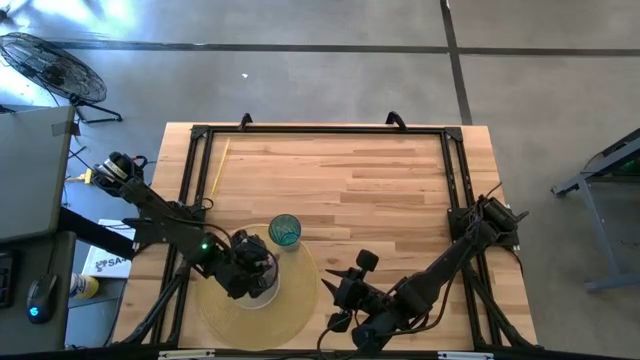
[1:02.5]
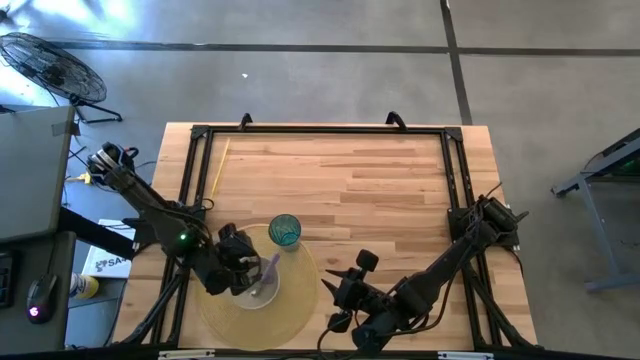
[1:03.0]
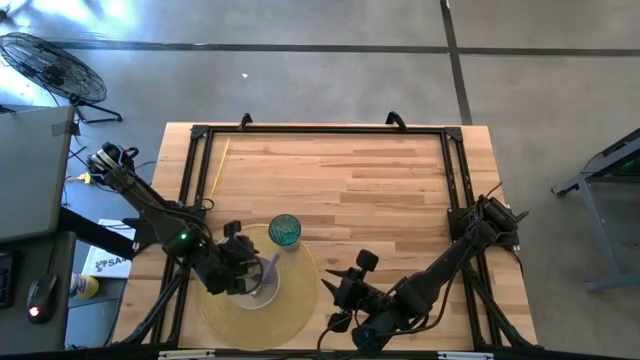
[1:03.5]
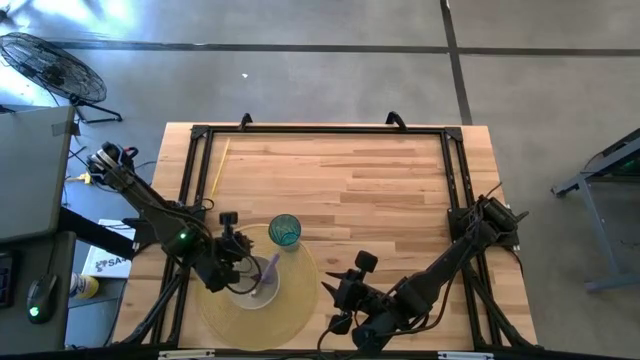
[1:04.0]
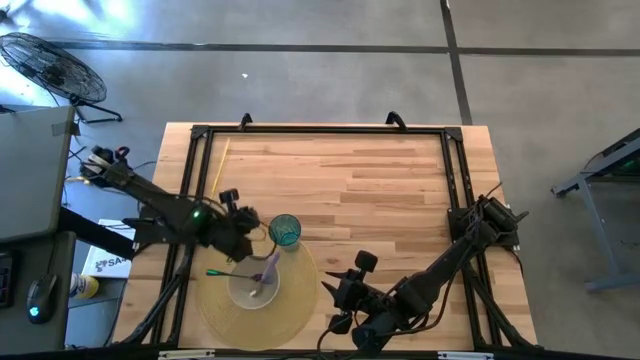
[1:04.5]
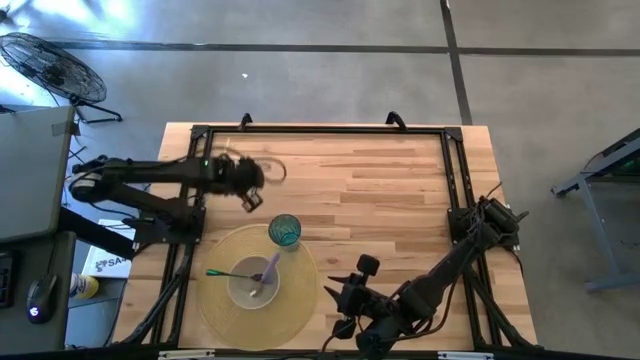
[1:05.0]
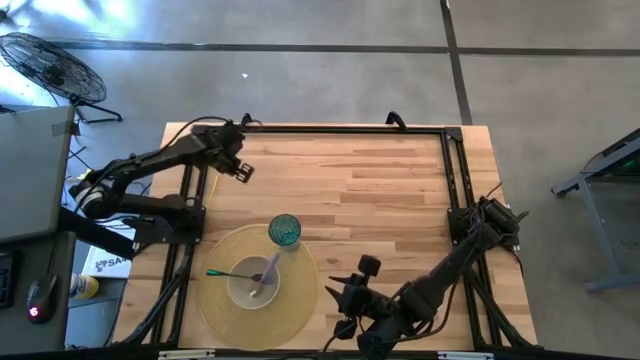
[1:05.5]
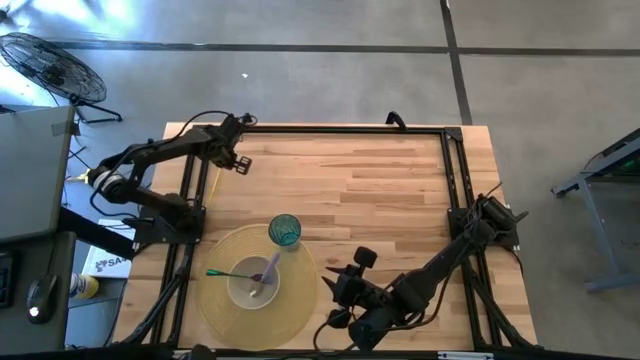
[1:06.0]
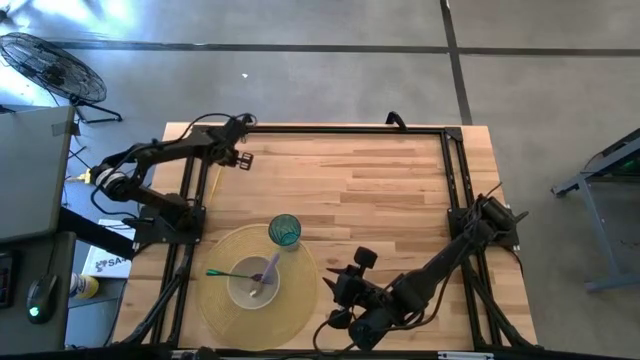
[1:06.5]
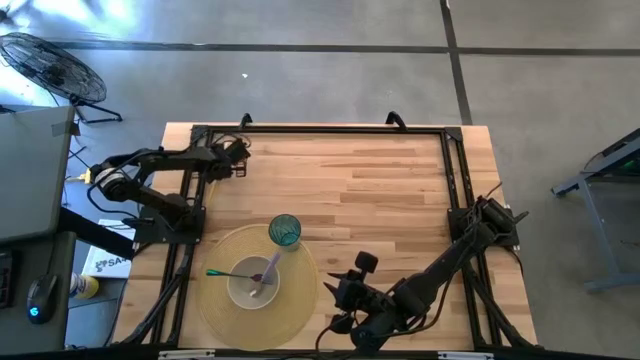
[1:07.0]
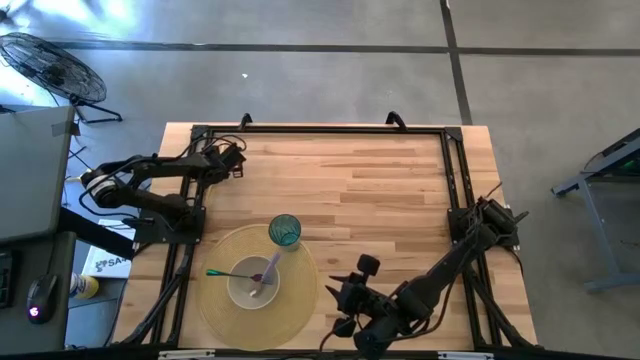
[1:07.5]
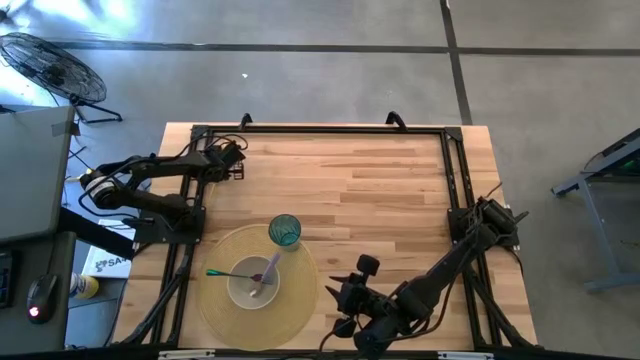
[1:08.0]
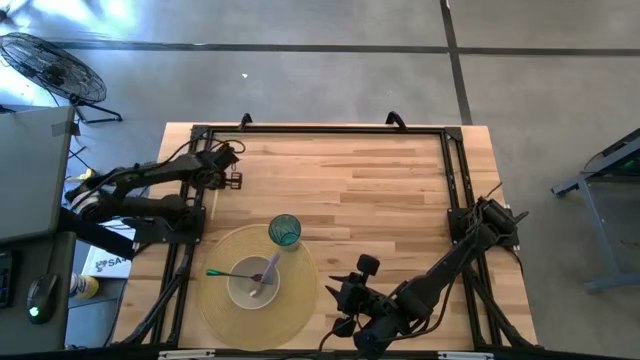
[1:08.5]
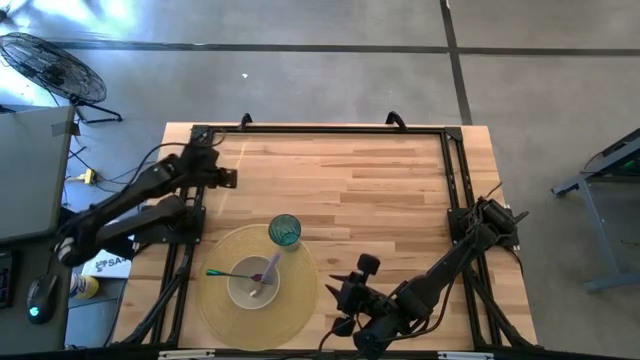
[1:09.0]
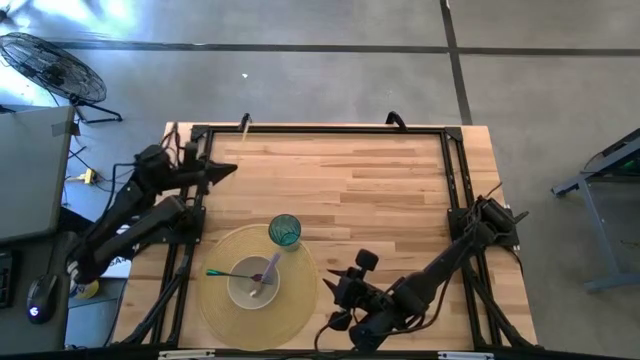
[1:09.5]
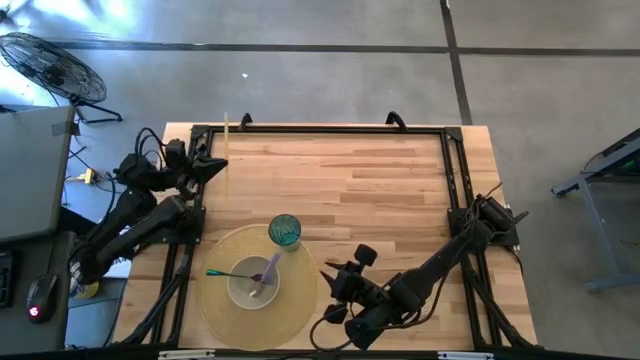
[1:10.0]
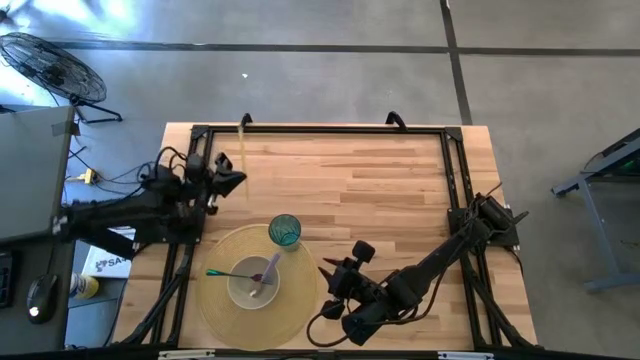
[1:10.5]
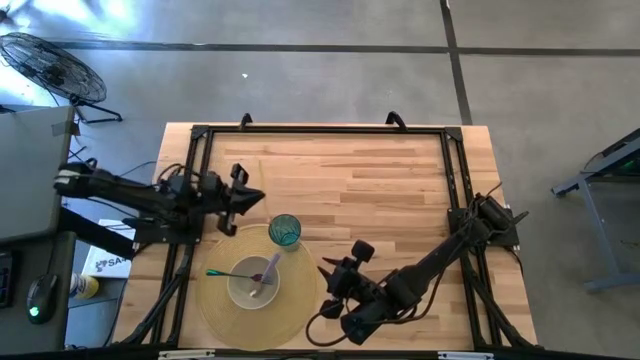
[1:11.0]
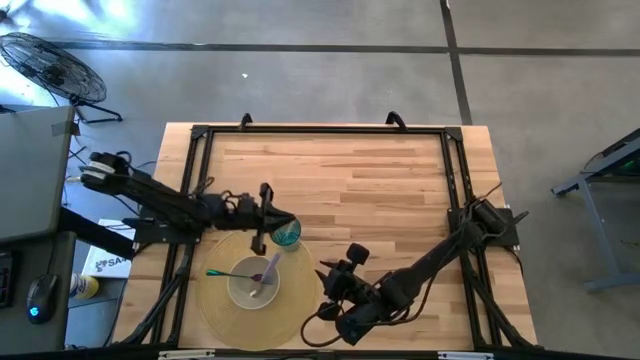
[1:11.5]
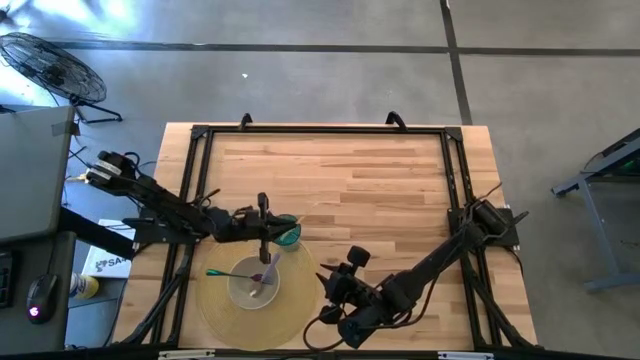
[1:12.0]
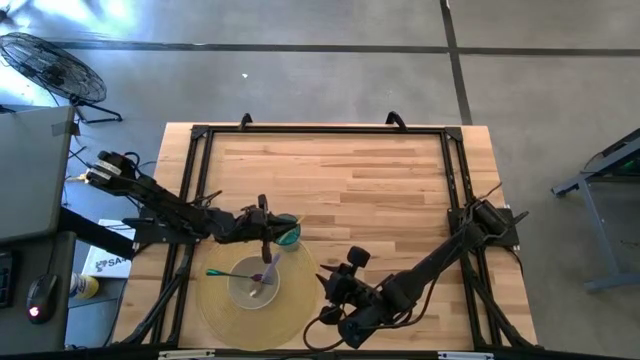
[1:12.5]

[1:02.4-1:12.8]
Task: Pick & Place Utensil
Put the yellow straw into the blue cup

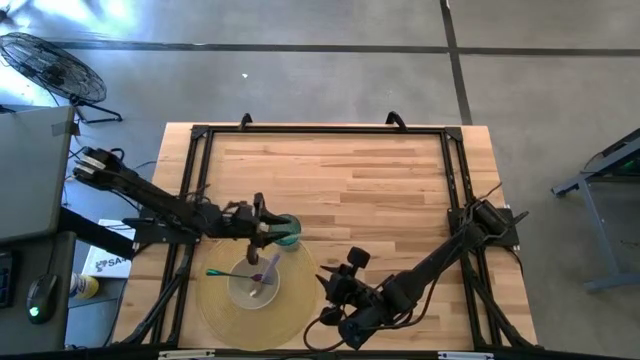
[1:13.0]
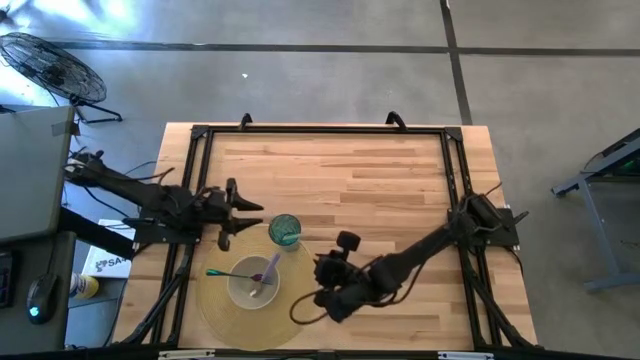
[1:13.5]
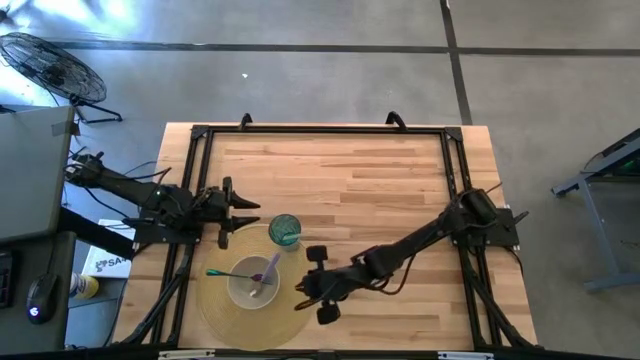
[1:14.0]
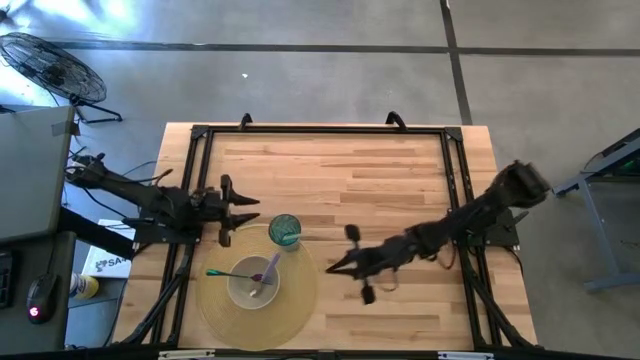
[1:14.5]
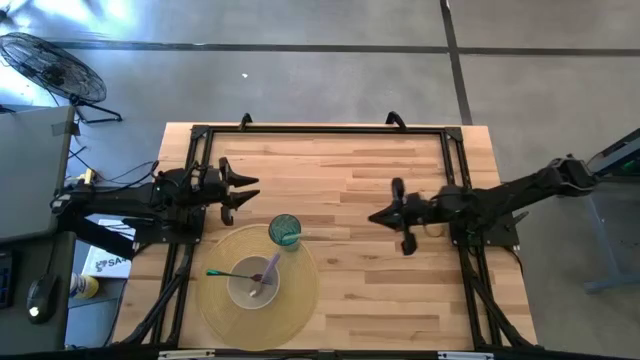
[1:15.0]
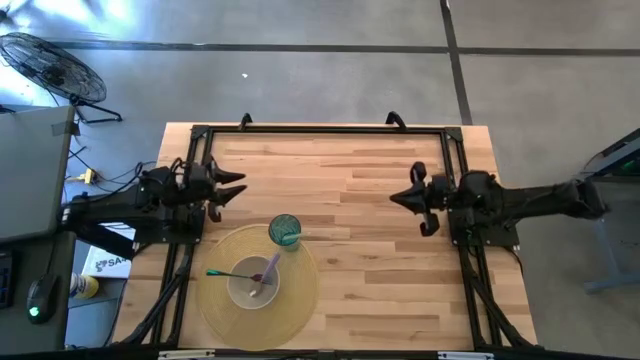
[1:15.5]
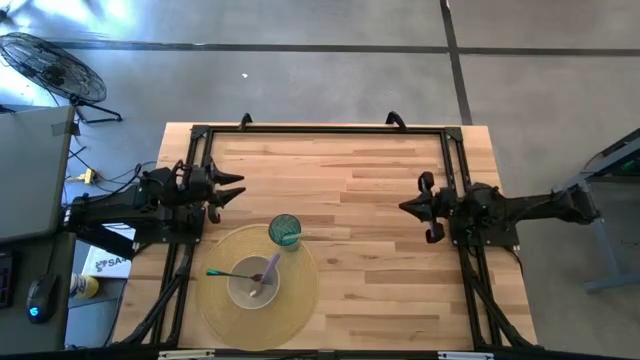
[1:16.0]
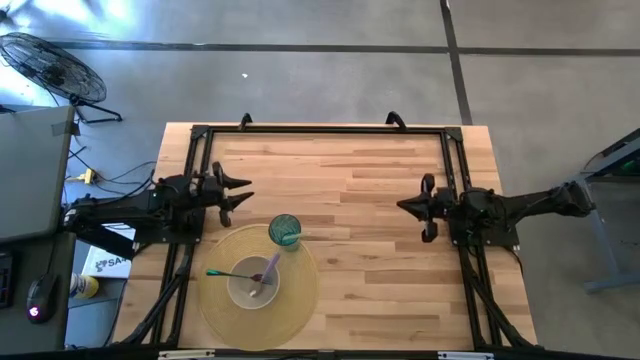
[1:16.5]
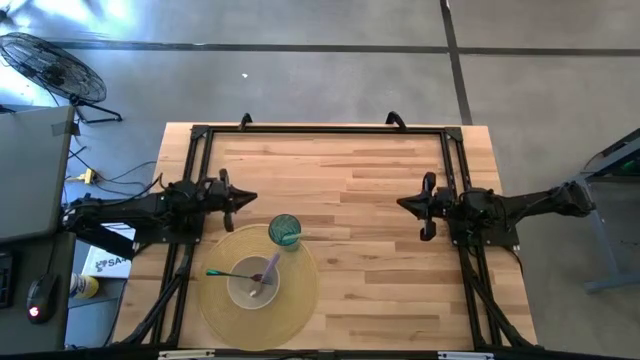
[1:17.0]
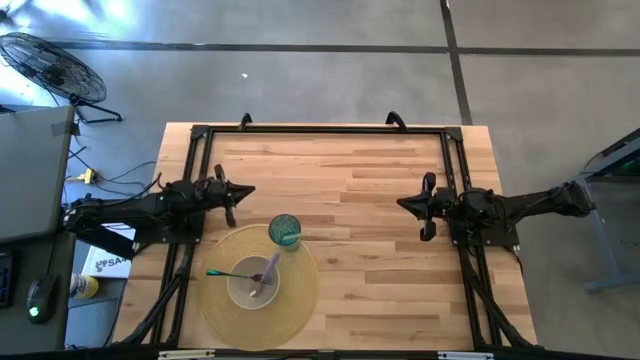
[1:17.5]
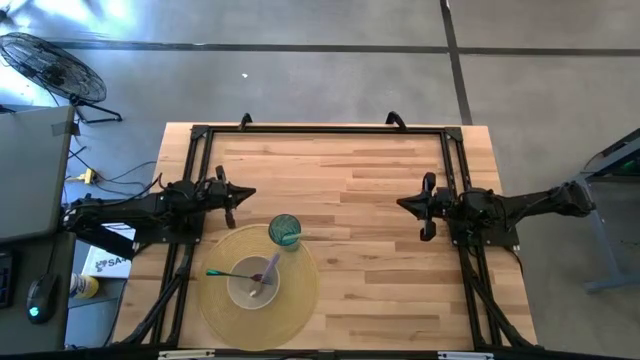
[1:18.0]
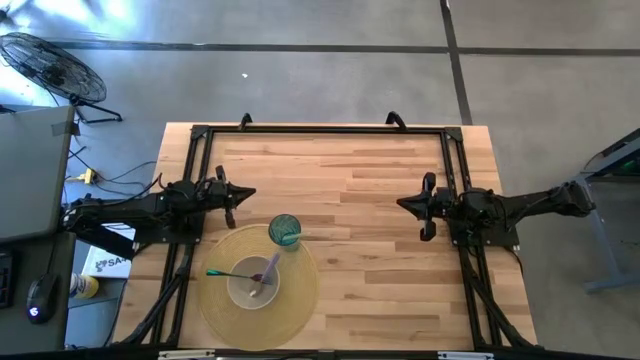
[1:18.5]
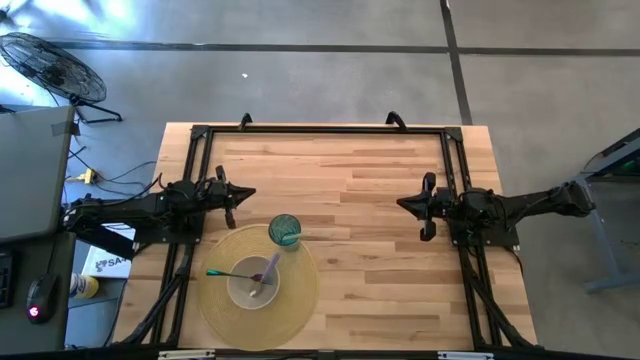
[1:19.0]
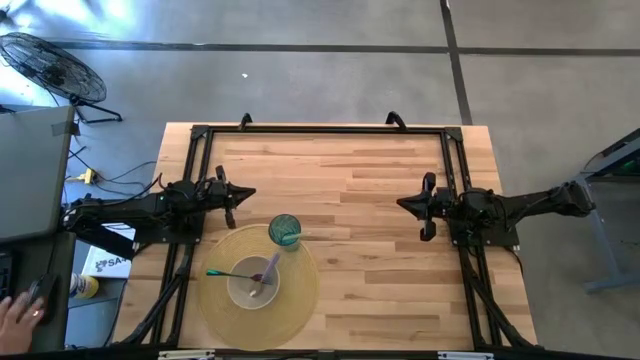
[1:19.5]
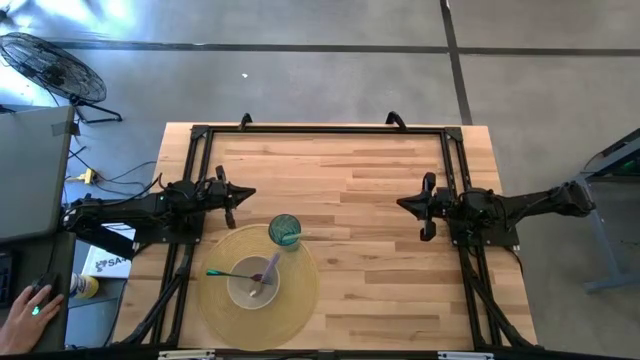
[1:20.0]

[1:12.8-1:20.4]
Return to Home Position

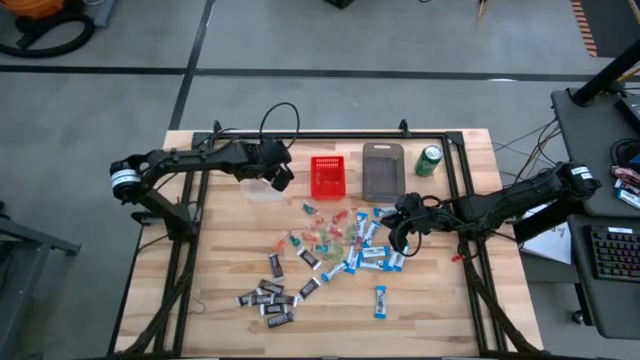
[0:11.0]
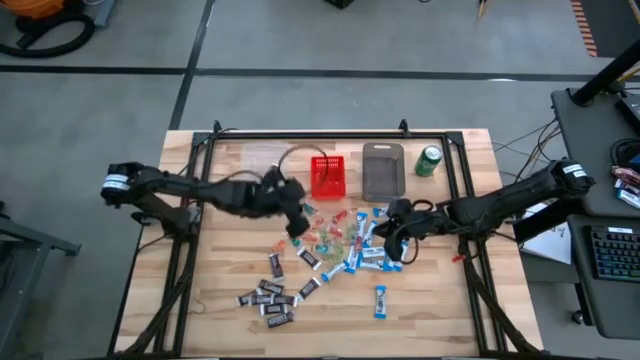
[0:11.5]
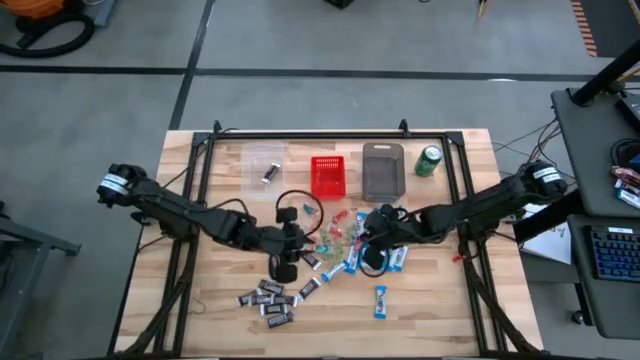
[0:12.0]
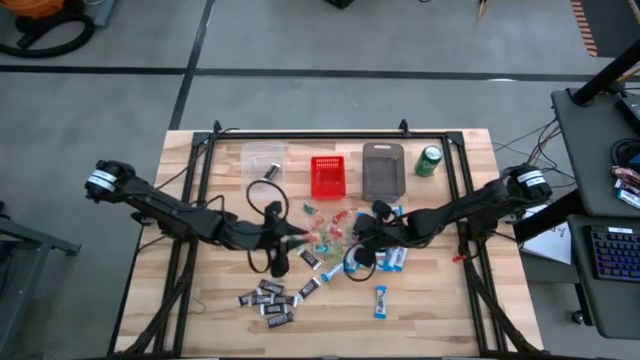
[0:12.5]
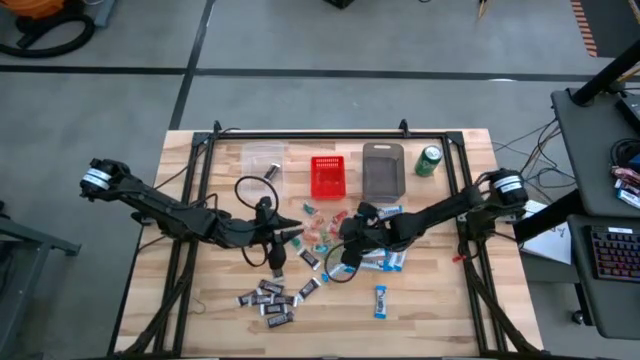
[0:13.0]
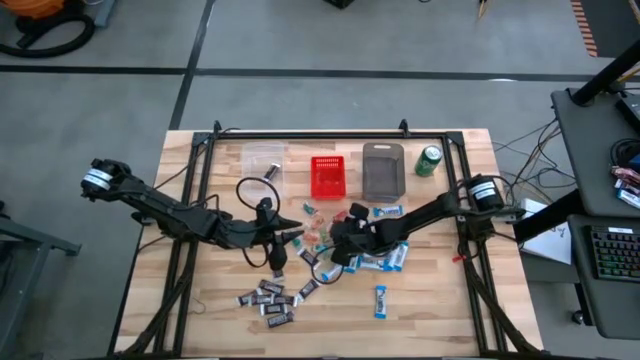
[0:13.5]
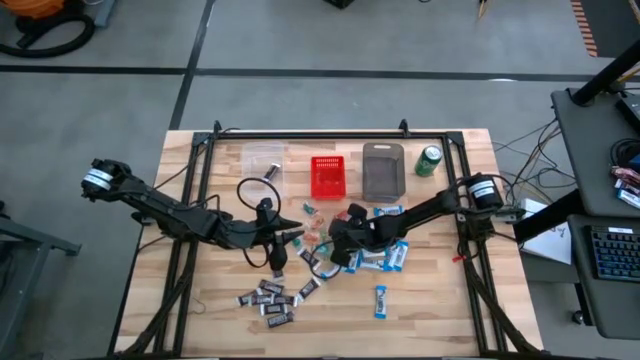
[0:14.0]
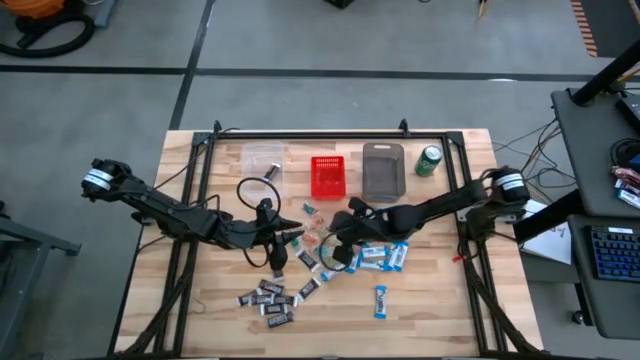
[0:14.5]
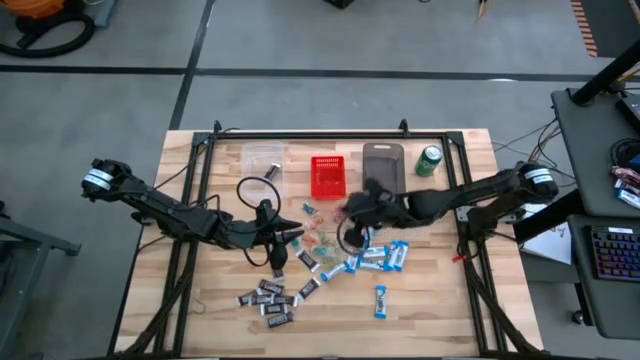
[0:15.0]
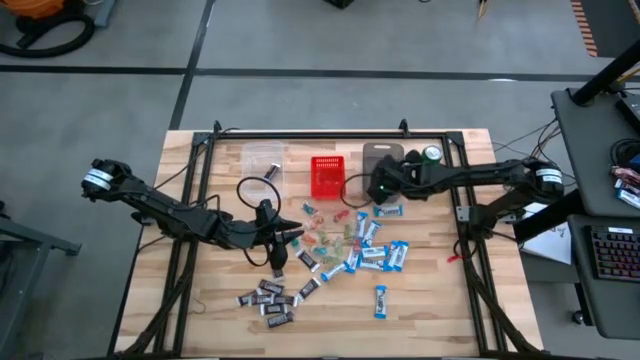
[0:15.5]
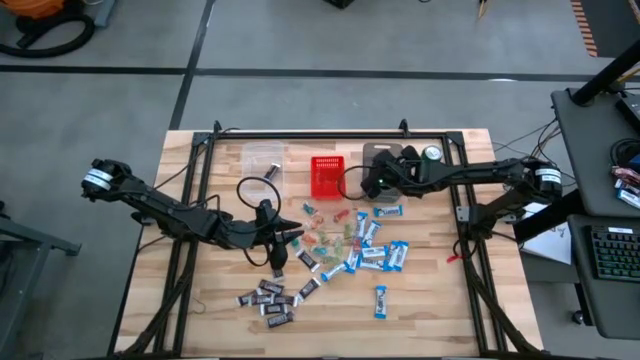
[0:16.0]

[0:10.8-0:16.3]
Task: Sort candy
Put the red gummy candy into the black bin
